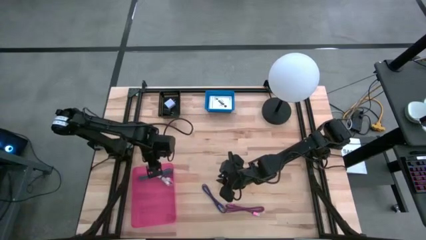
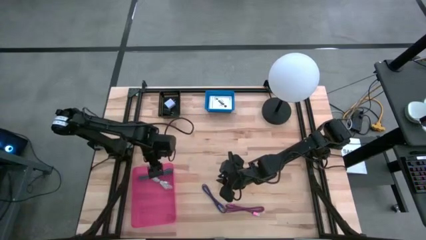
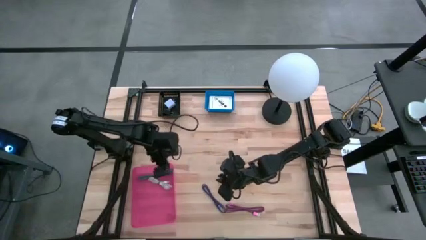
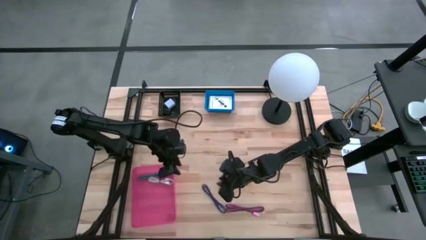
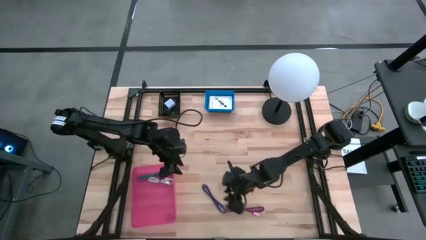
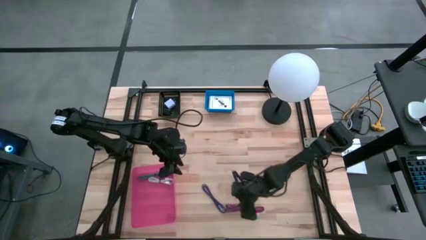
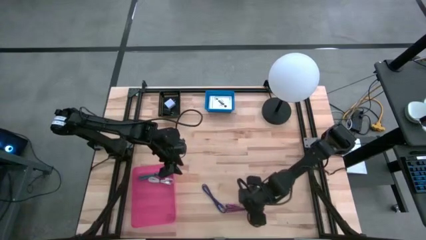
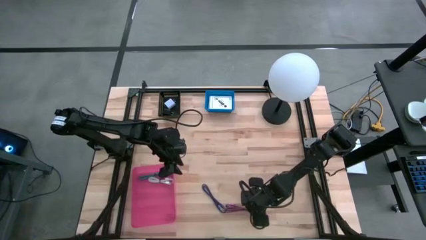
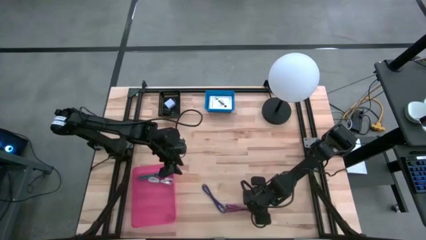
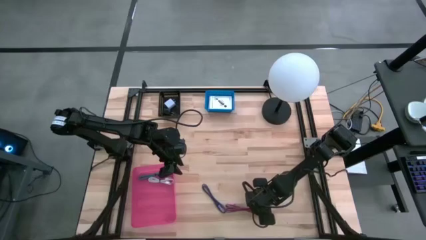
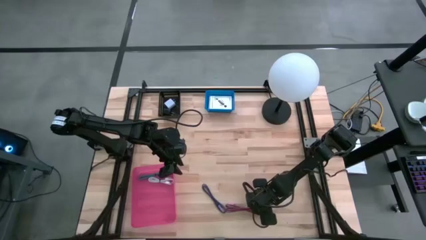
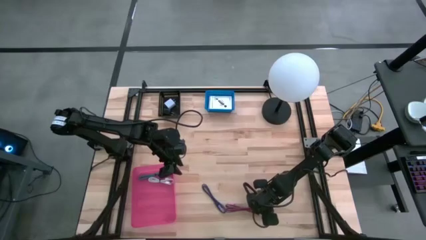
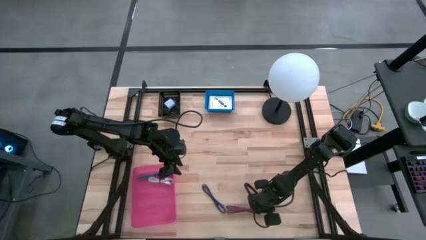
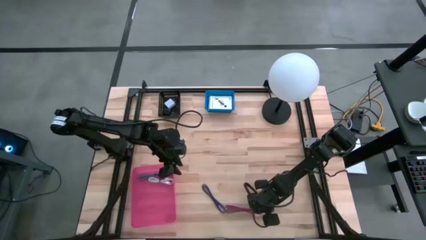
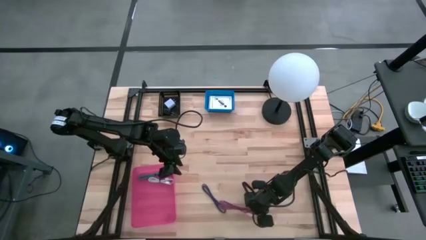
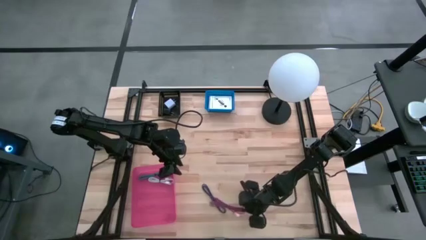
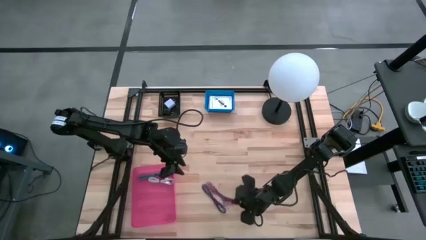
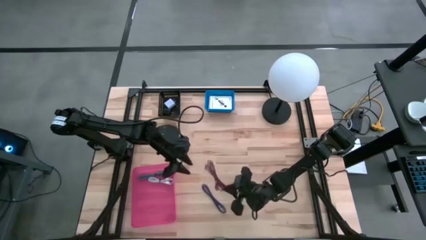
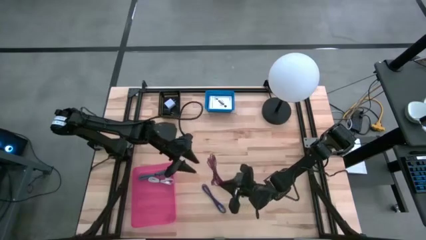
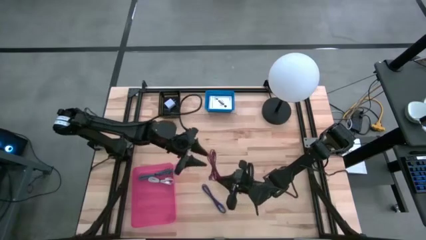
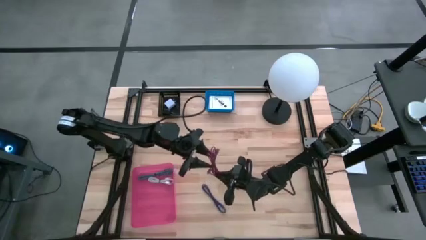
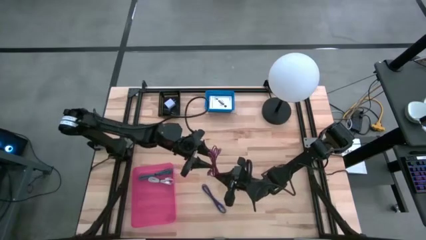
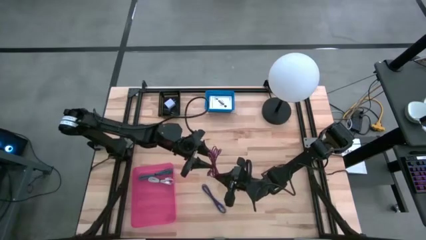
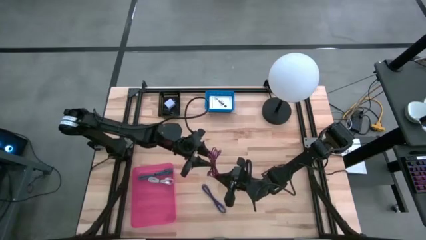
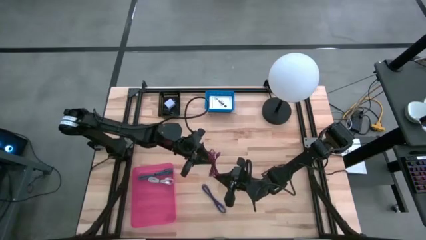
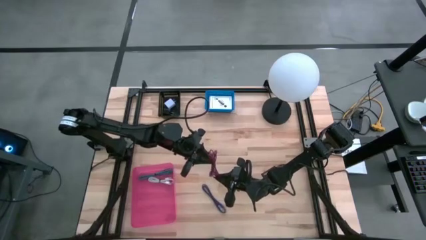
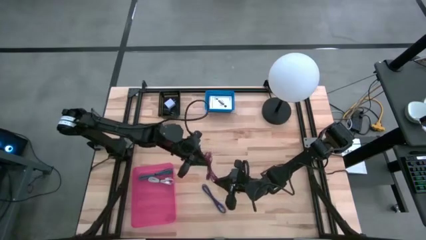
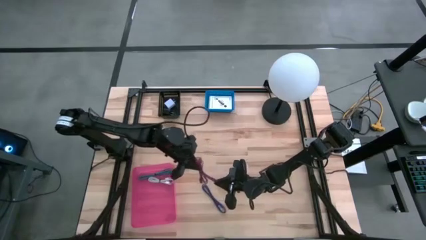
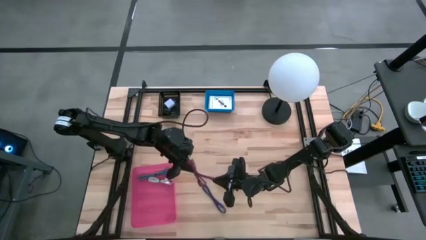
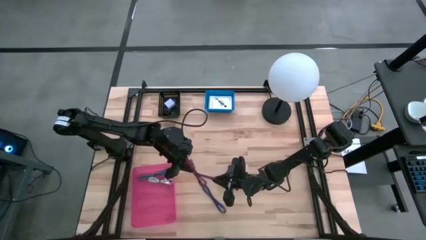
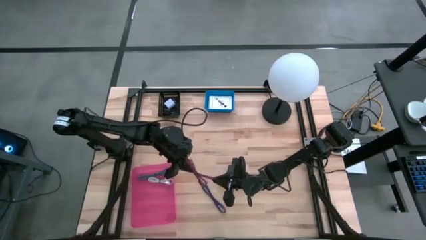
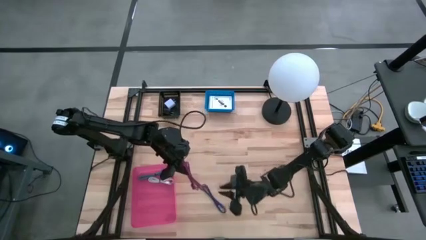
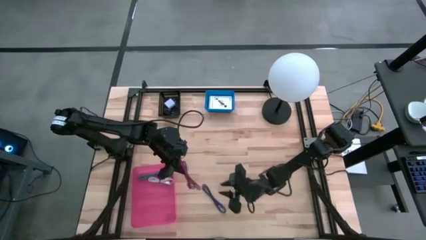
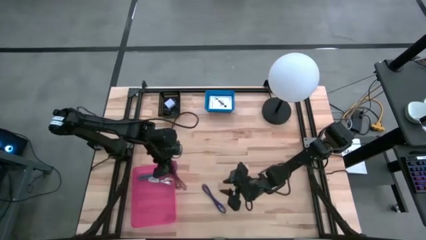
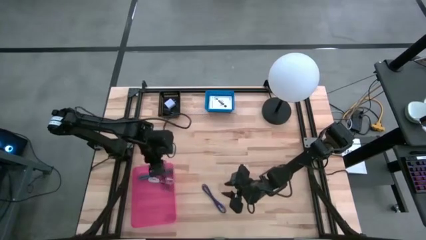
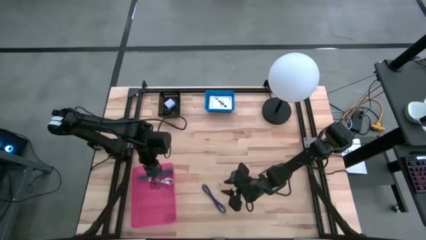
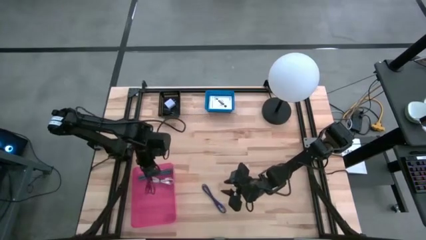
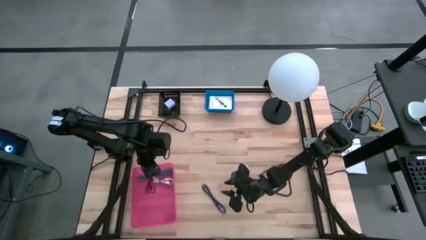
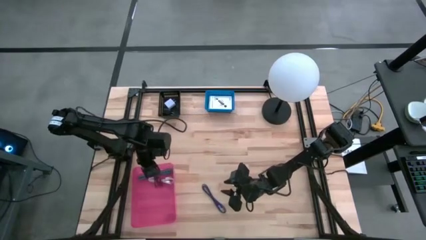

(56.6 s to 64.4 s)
Task: Pick and place items into bin
Put the pink tied charger cable into the red bin

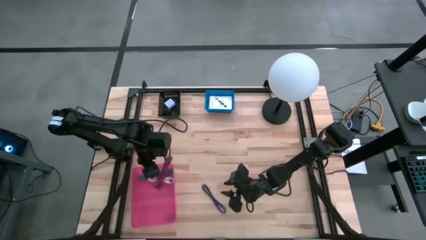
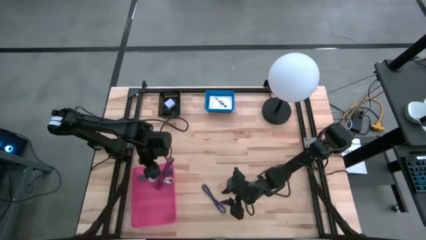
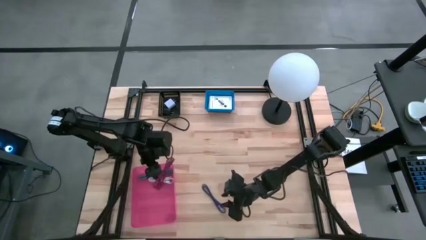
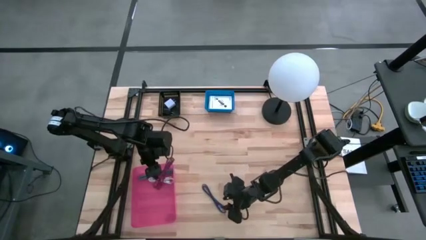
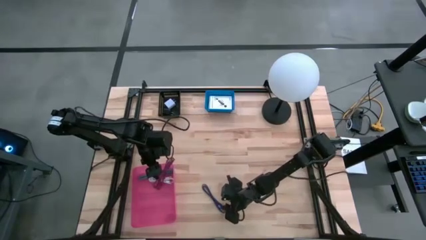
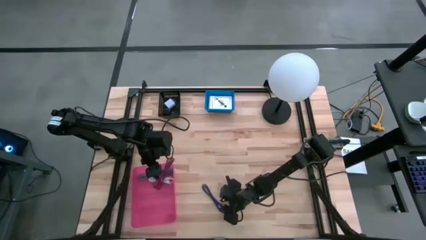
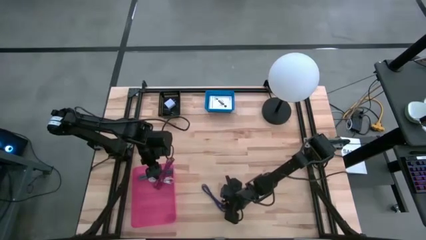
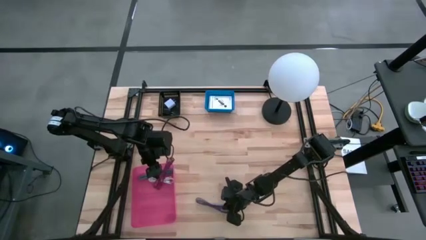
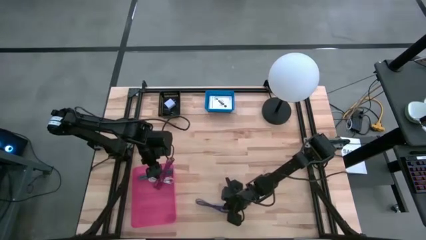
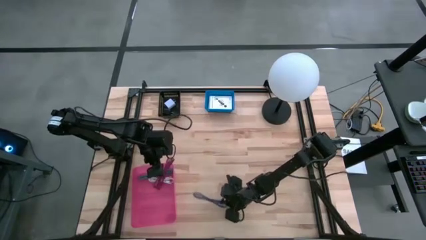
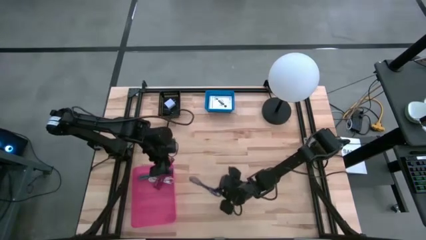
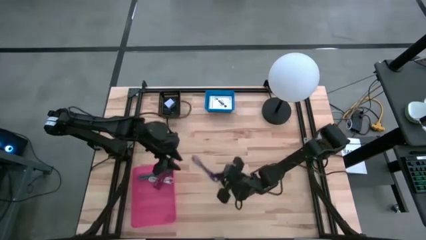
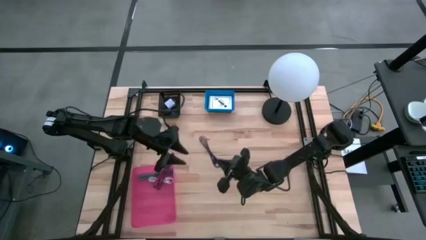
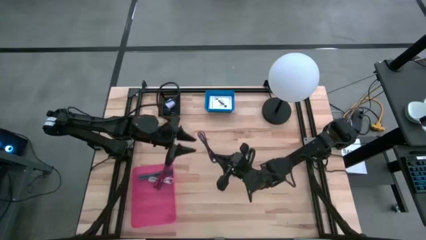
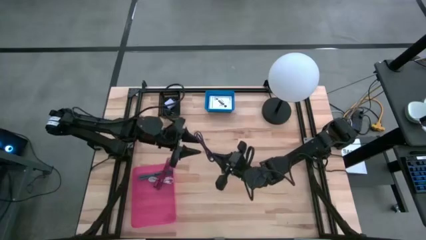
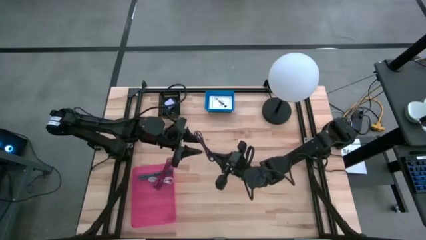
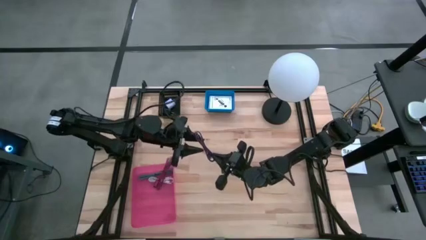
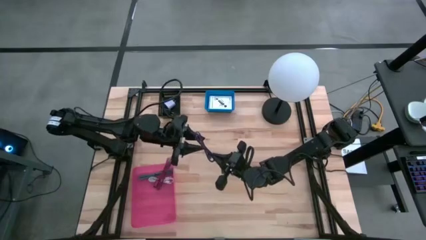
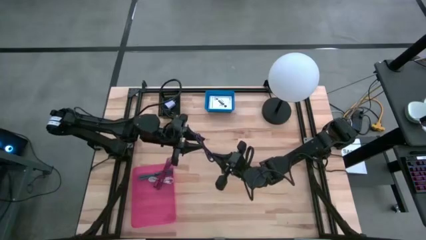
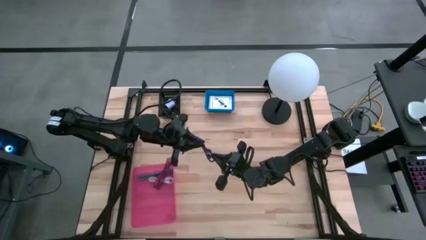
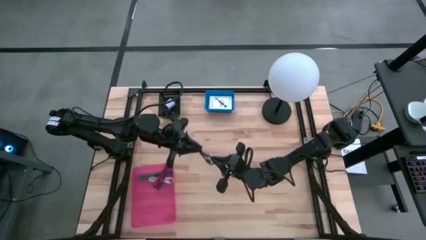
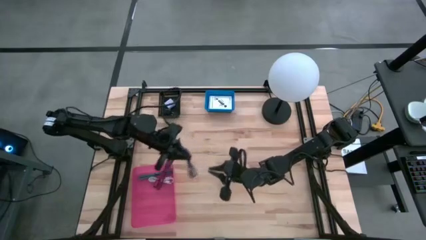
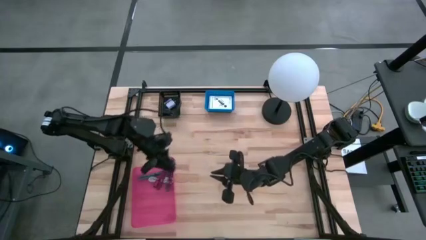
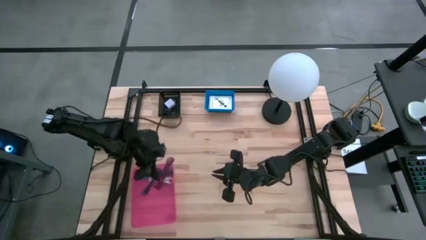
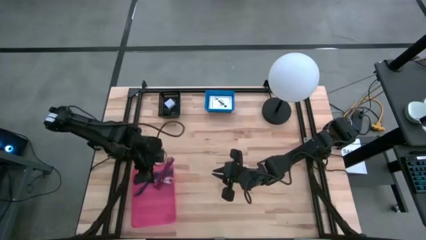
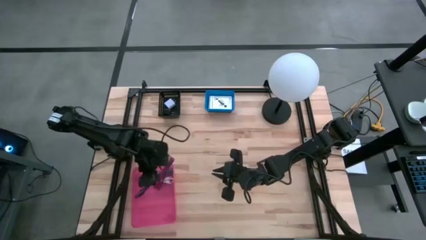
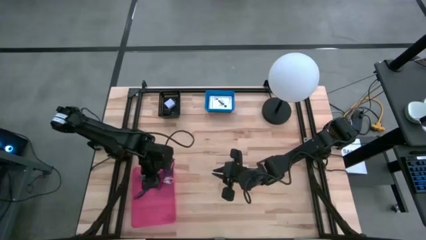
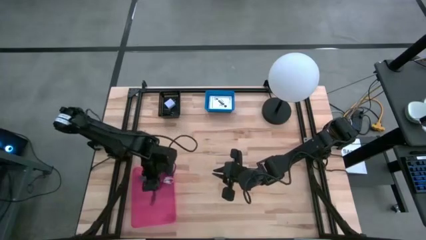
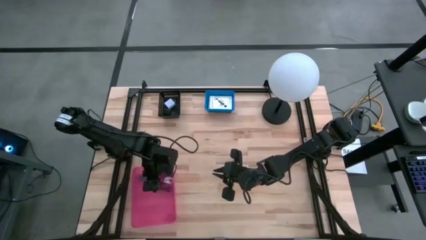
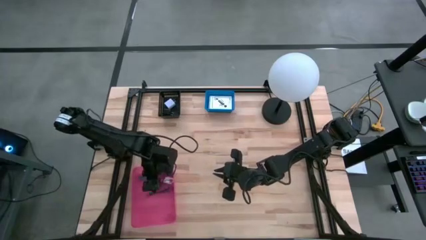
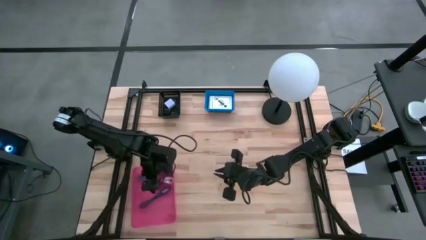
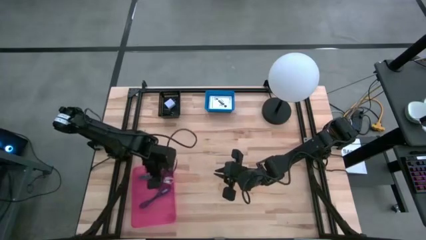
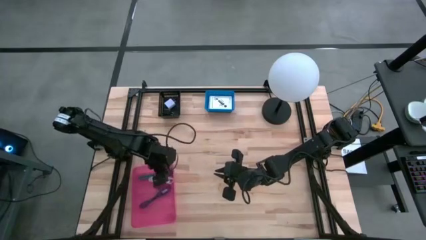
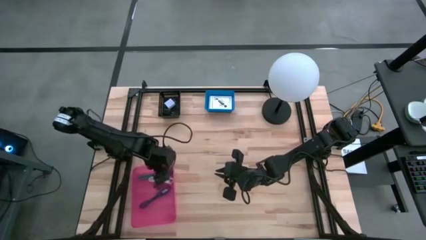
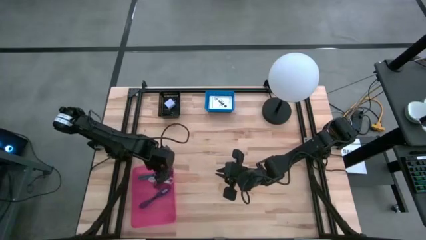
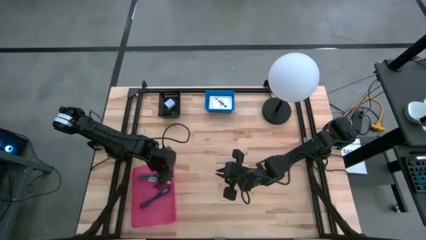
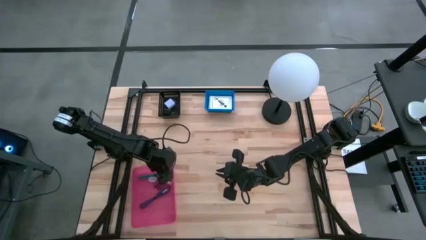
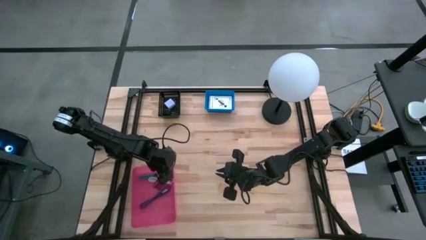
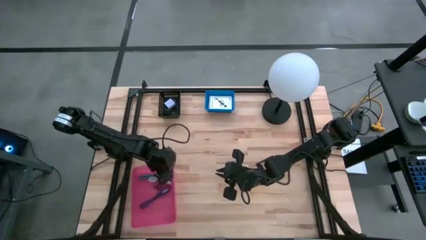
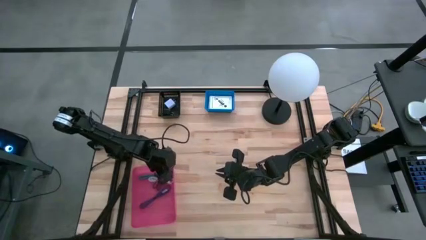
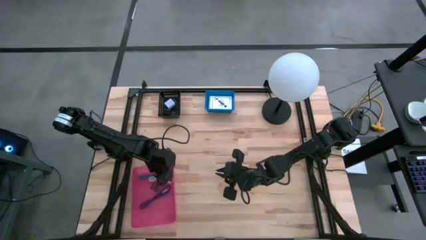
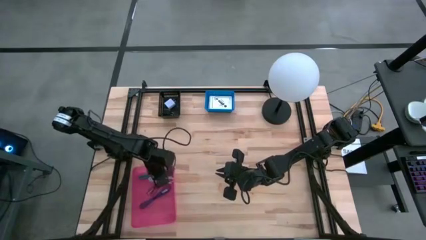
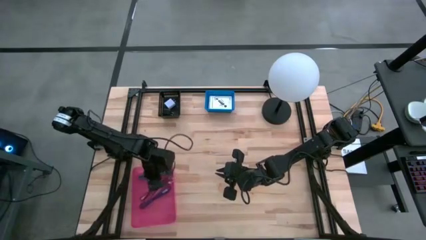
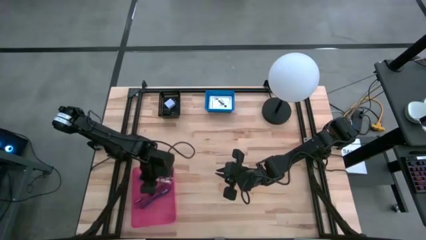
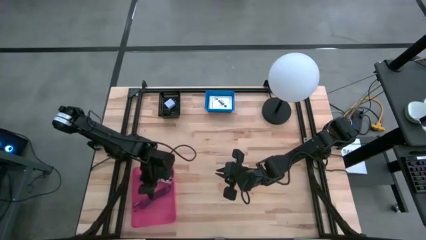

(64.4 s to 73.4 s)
Put the blue tied charger cable into the red bin
